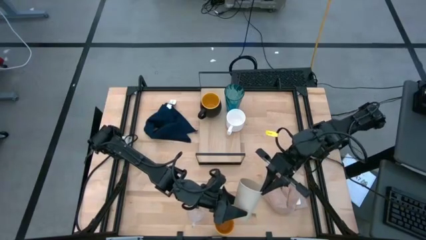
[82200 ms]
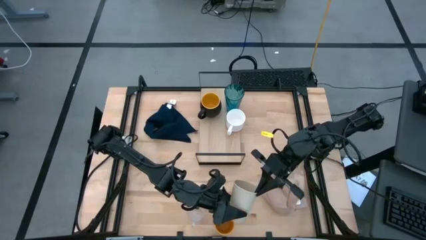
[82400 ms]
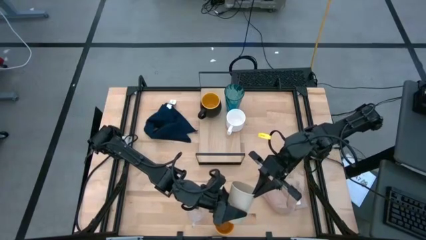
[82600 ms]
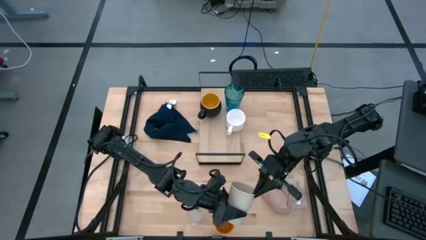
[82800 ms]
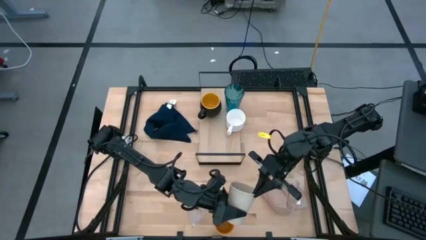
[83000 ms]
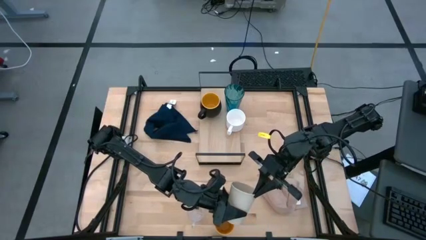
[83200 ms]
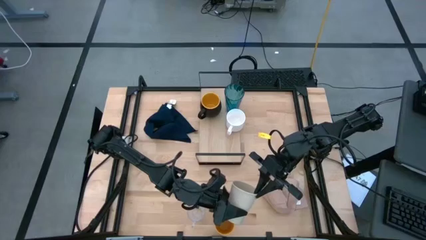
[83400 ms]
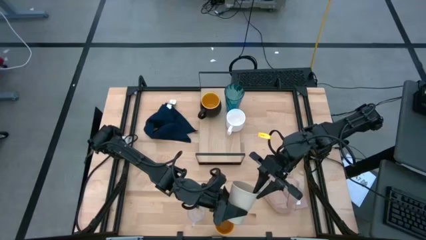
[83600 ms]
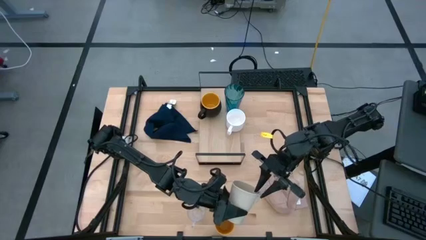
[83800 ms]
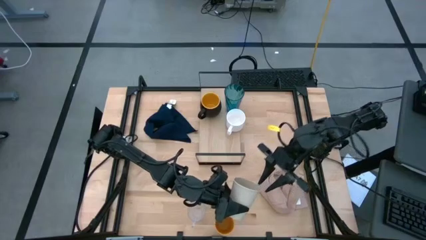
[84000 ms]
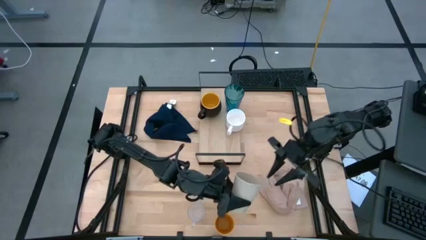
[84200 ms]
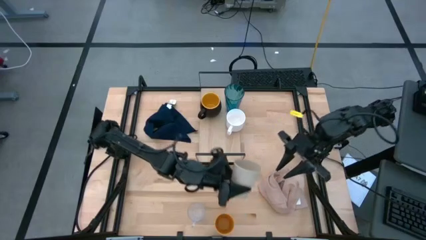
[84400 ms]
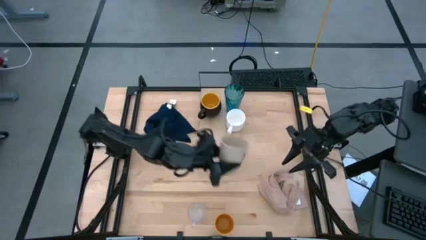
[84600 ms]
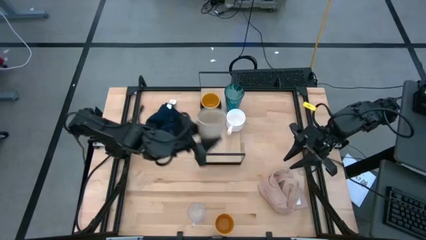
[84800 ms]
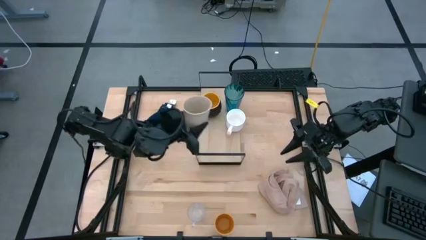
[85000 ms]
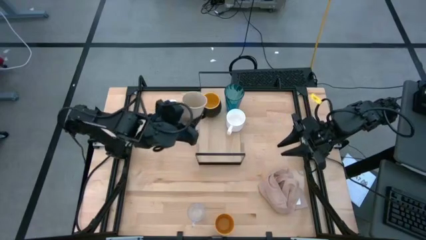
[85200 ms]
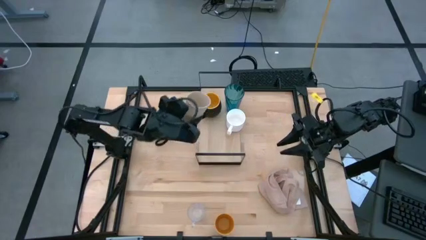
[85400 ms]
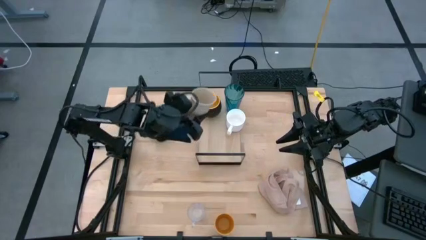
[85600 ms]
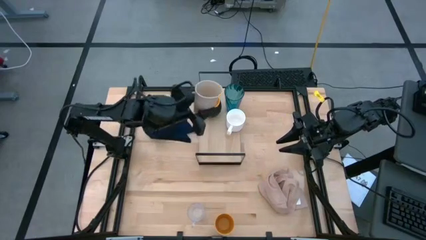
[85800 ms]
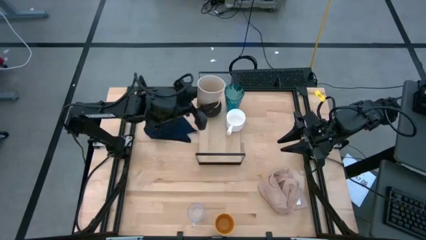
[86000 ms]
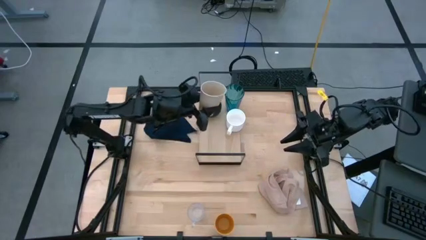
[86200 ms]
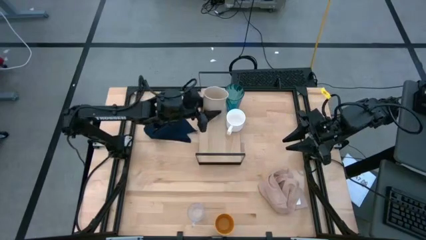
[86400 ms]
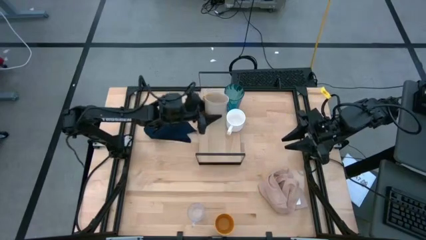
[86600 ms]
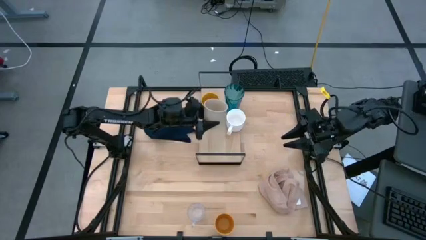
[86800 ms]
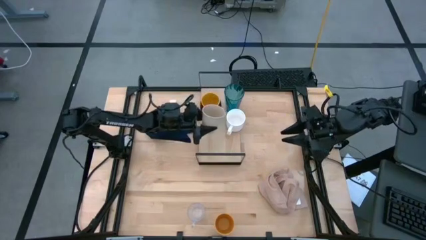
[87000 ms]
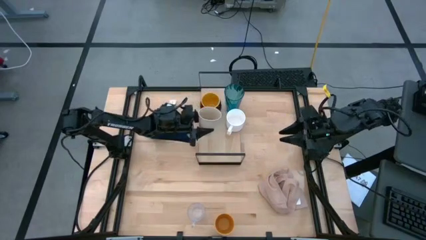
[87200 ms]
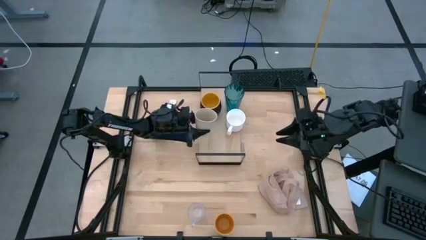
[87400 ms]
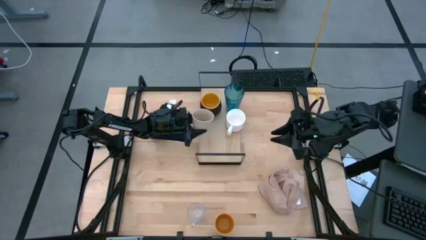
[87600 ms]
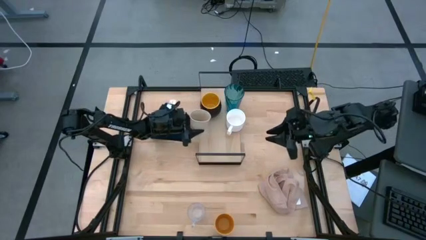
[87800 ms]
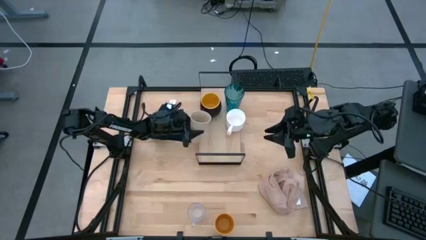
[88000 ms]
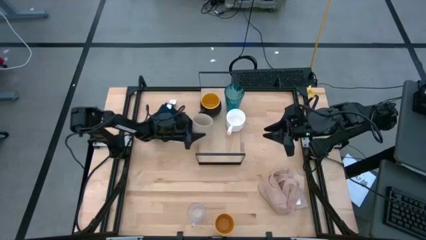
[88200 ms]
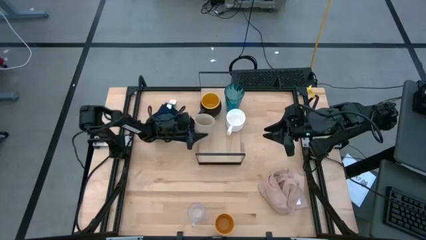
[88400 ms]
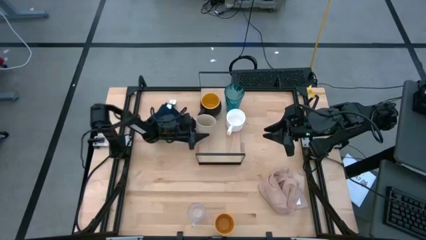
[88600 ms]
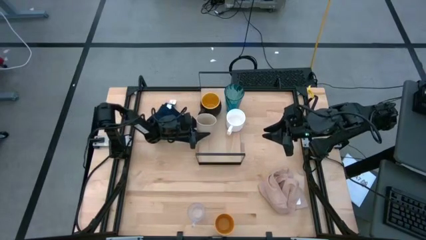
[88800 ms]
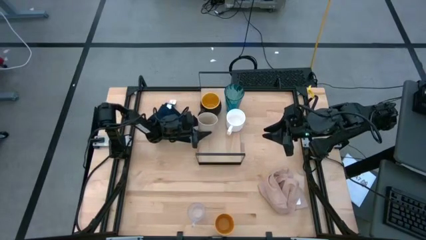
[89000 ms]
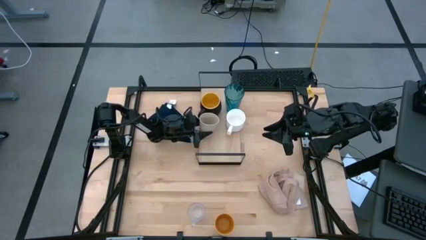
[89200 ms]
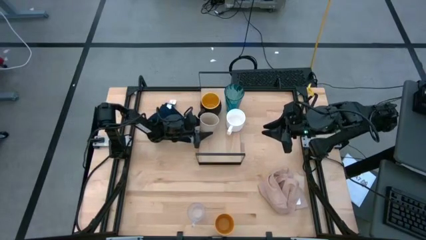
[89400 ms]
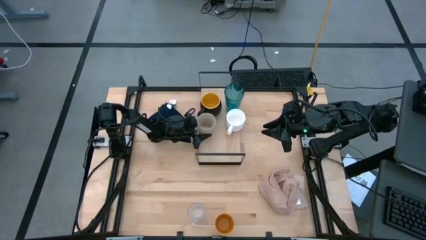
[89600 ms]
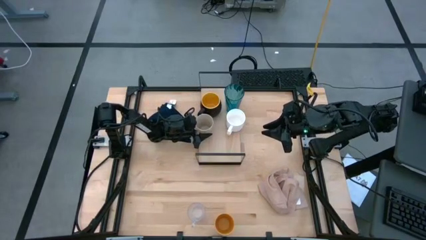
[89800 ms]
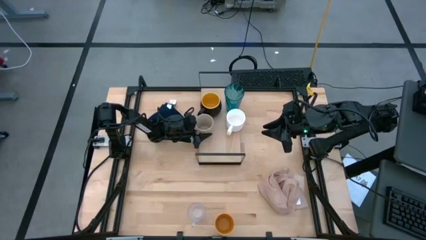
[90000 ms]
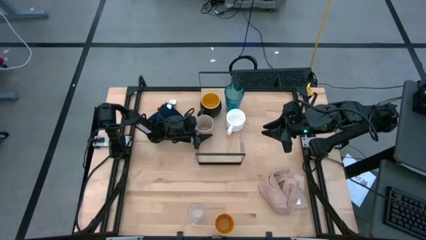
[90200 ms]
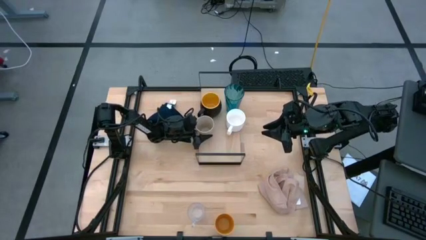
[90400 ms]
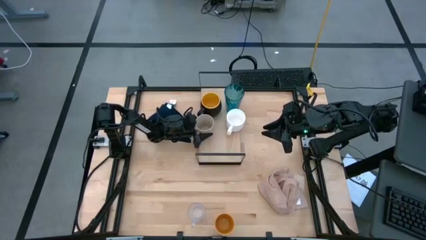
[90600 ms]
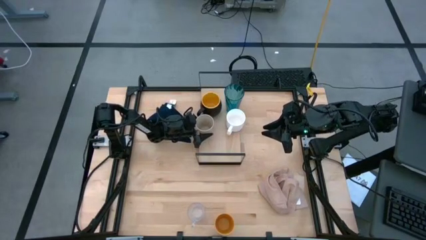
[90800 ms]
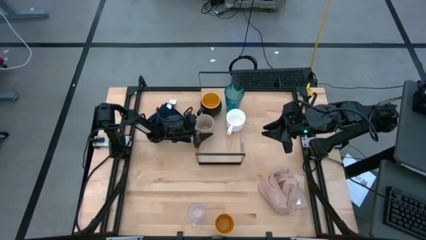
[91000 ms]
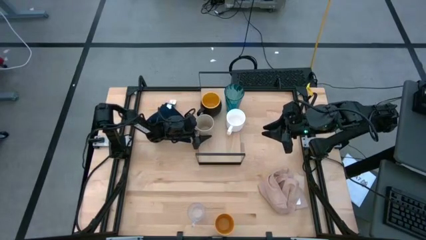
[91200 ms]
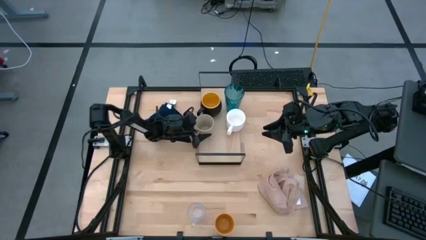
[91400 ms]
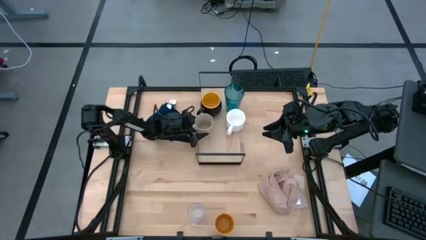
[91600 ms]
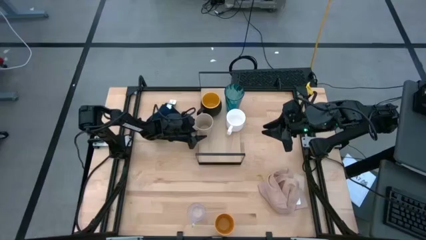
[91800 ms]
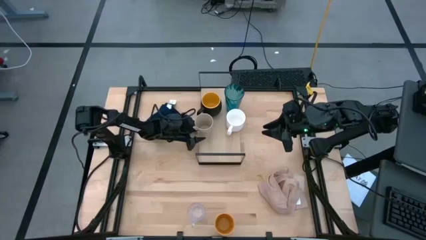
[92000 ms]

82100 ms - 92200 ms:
Task: Stack small to large cups/mugs on shelf
Put the brown cup on the shelf

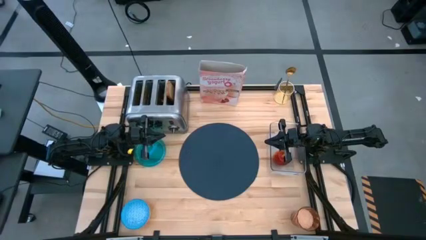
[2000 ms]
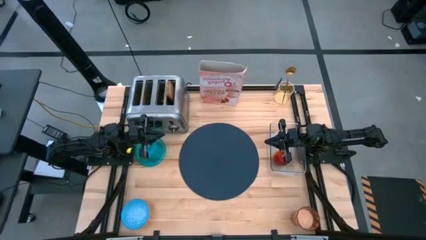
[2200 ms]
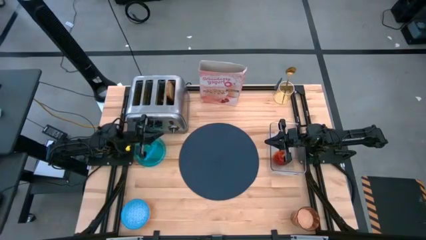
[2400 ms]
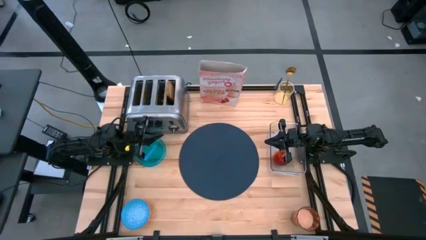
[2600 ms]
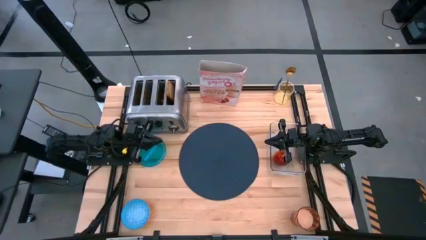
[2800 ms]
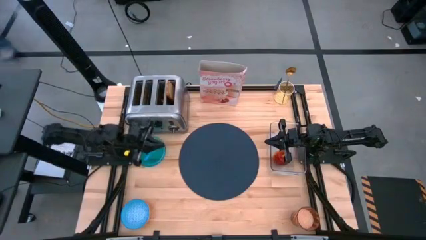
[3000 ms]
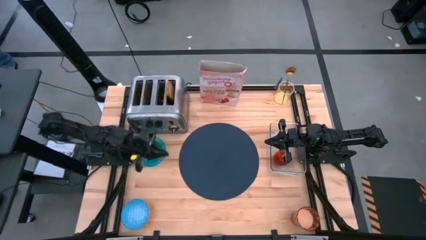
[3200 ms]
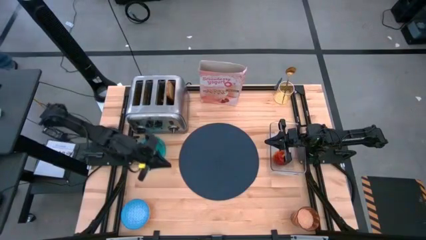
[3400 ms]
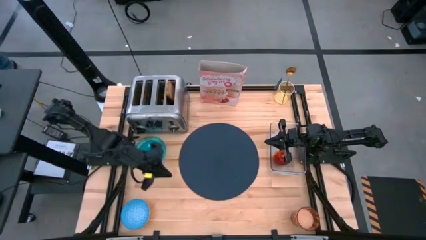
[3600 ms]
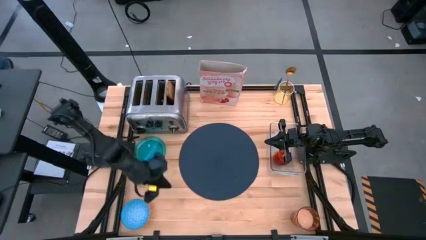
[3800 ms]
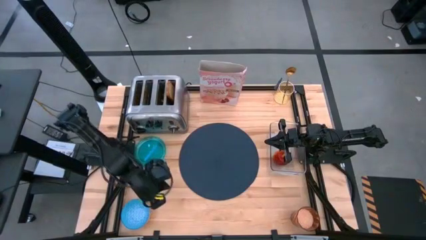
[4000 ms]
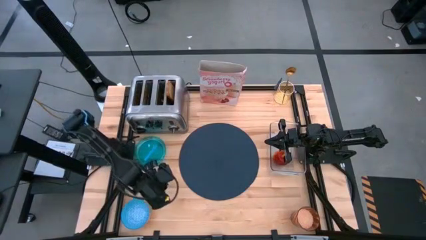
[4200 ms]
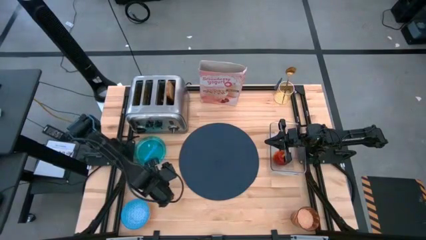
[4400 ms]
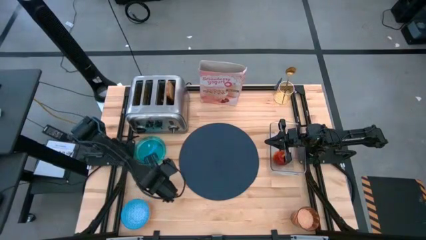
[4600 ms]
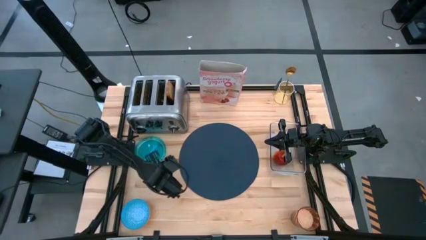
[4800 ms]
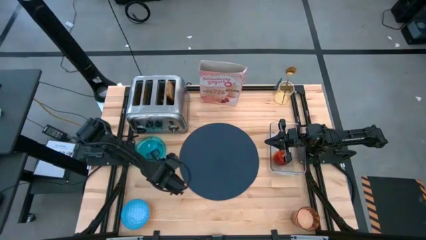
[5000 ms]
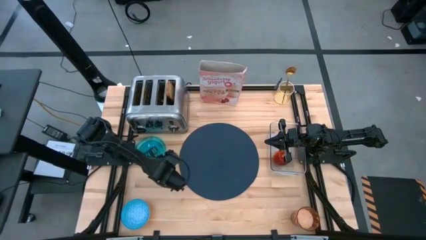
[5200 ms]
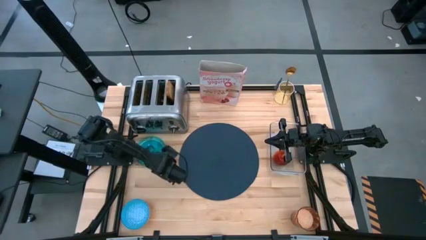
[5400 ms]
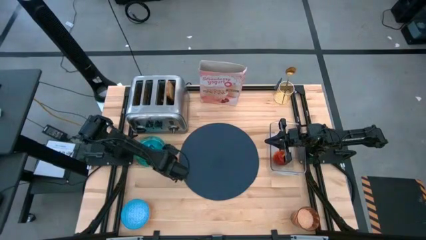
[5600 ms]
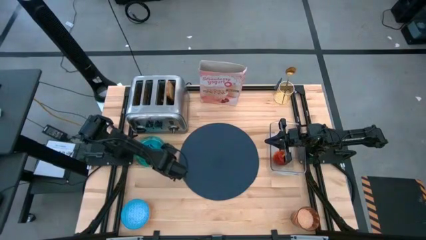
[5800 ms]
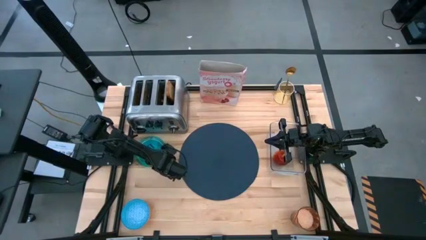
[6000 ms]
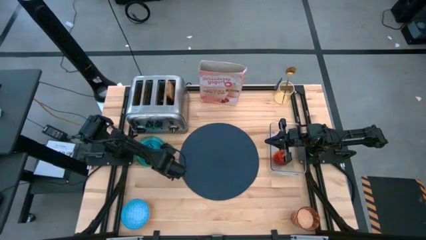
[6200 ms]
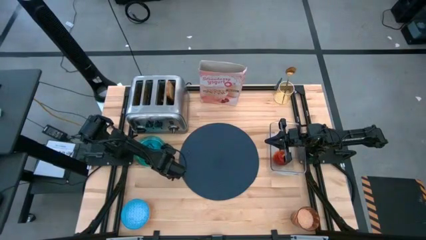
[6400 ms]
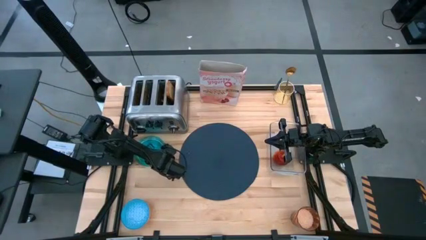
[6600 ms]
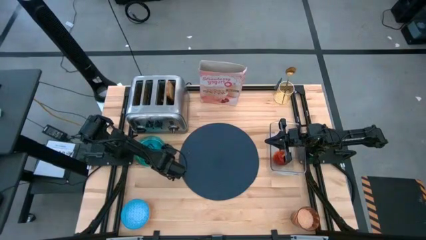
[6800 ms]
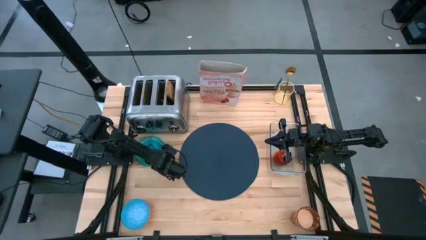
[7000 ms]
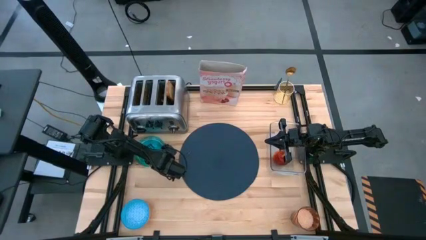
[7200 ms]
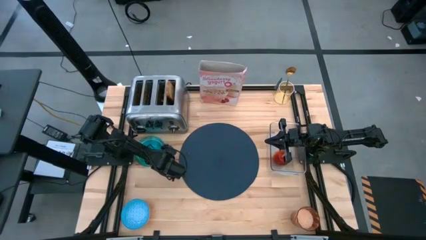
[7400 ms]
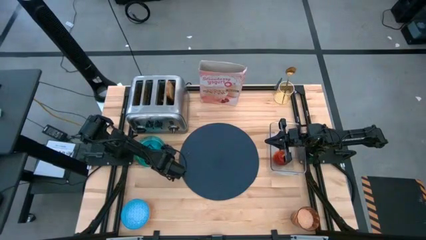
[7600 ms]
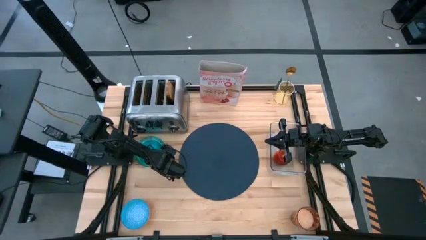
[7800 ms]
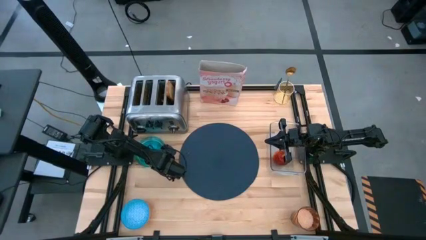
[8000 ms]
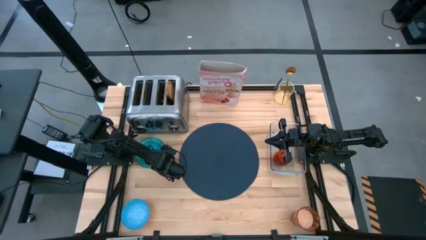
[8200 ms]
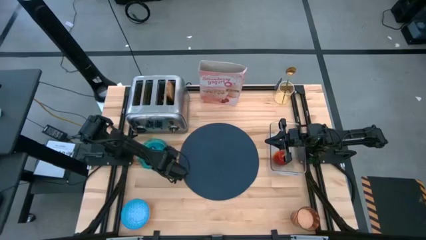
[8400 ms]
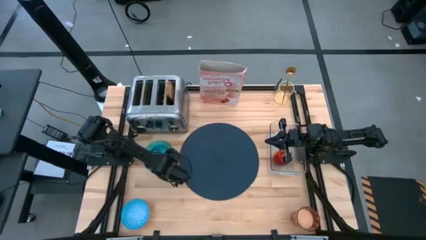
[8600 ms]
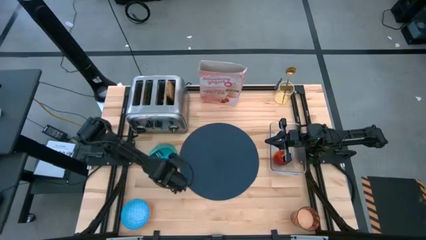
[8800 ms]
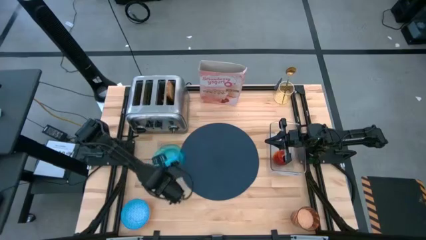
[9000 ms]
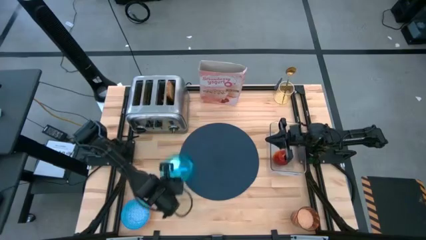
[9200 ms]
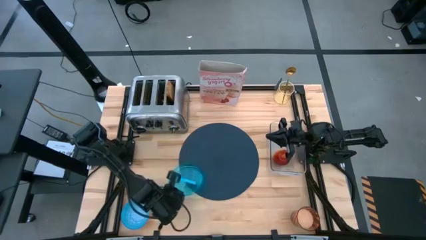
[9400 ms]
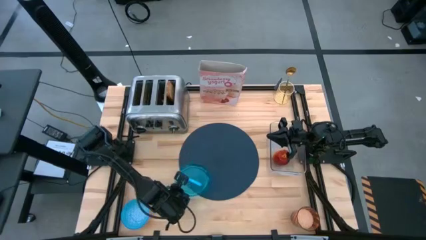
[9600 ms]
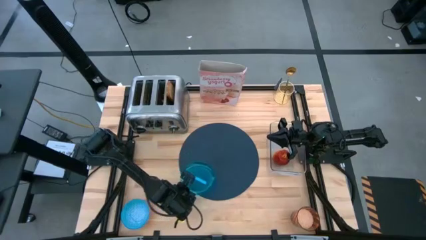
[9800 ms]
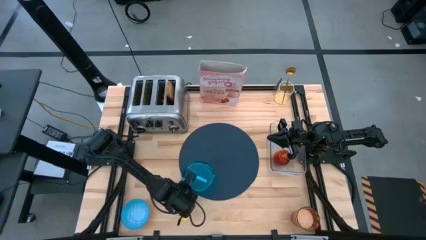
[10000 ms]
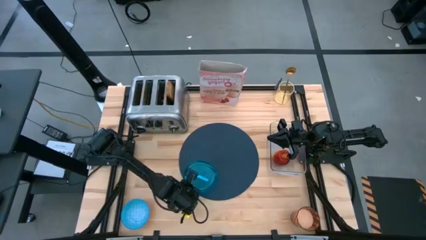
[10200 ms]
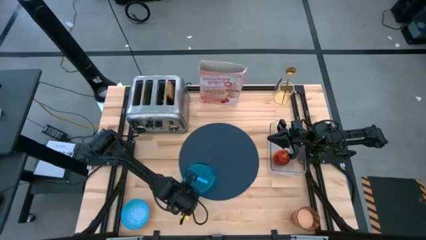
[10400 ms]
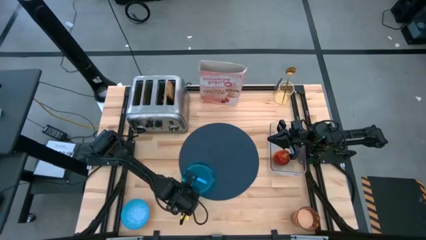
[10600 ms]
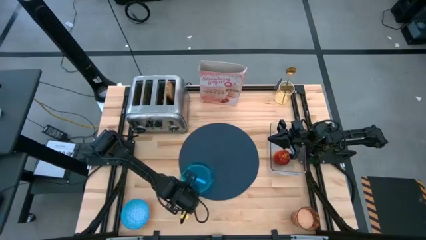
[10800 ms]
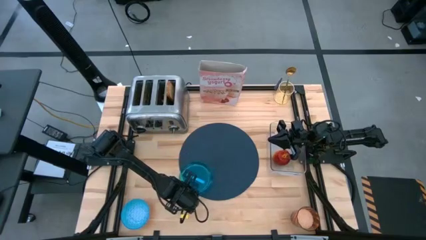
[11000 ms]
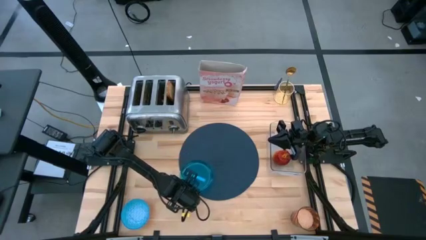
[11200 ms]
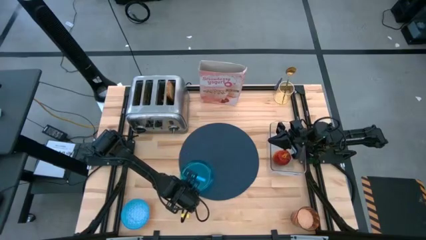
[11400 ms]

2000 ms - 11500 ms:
Task: Arrange a breakfast setting
Put the blue plate on blue table table mat
